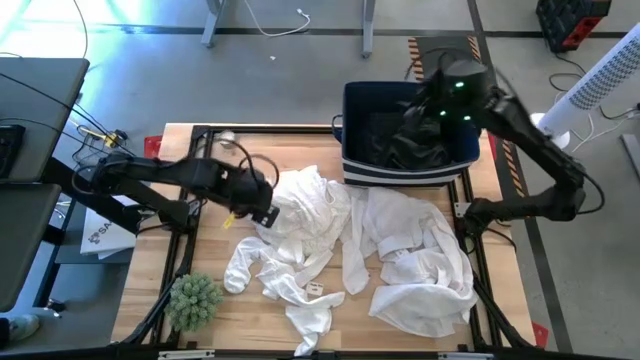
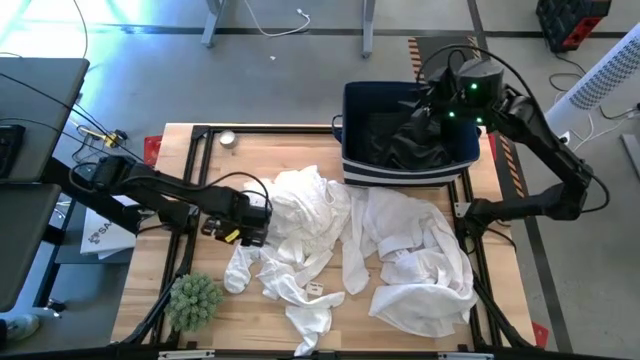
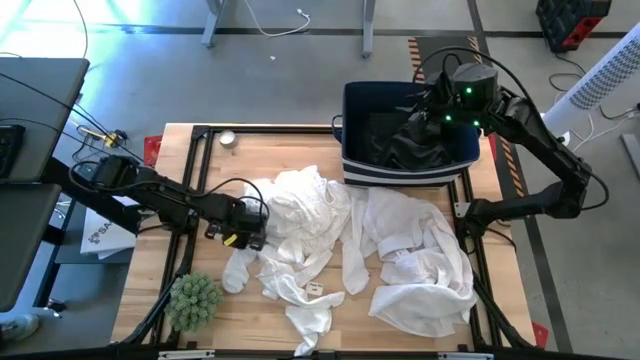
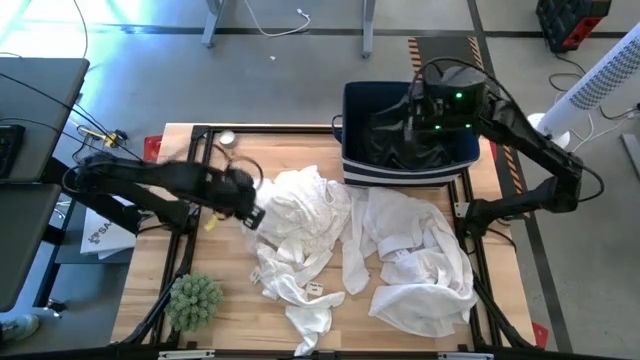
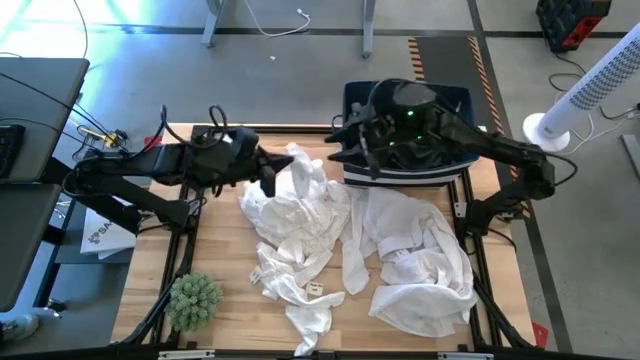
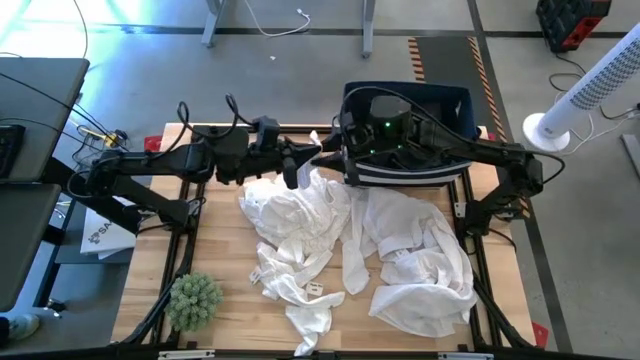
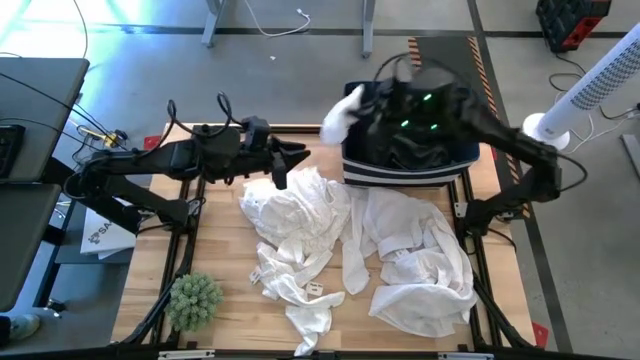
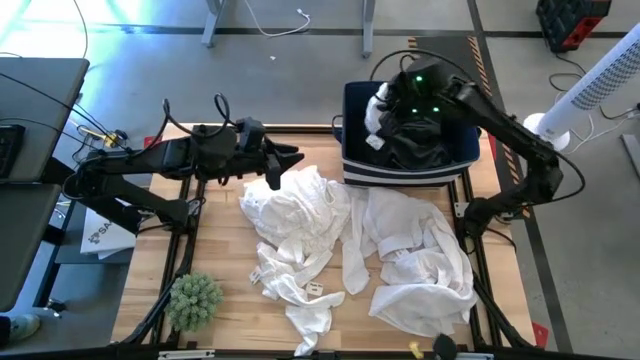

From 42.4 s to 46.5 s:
Task: Sort clothes
Put the white sock into the blue laundry organizer

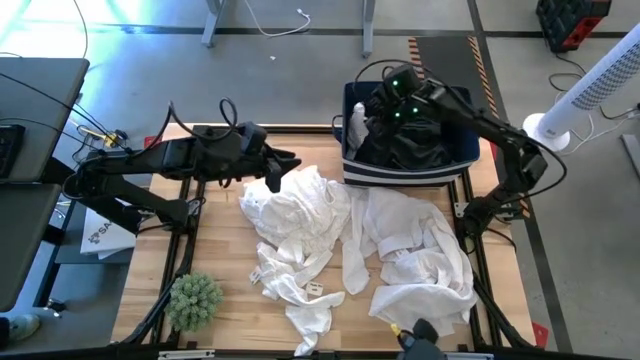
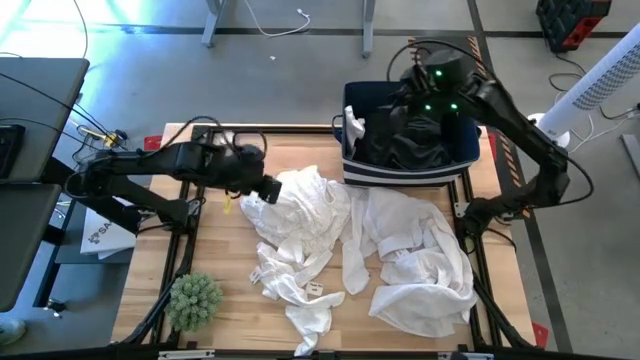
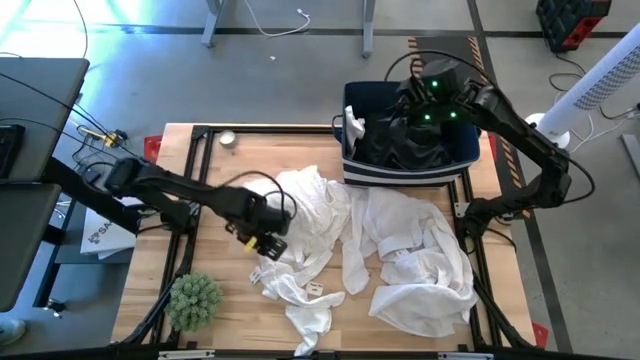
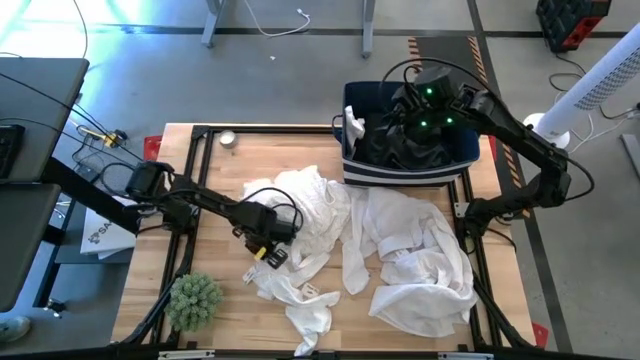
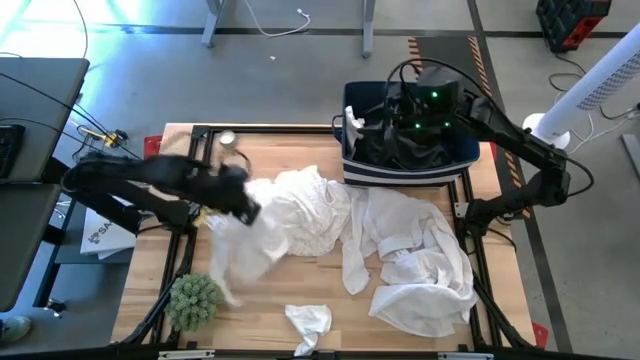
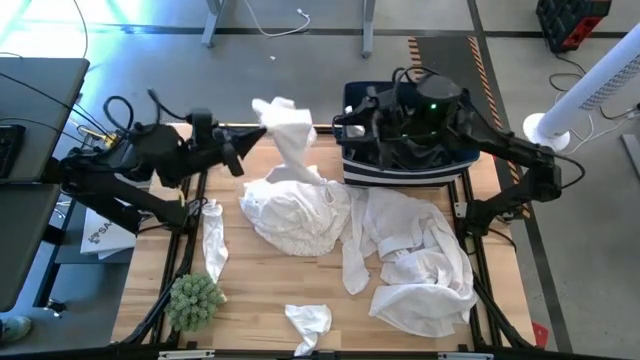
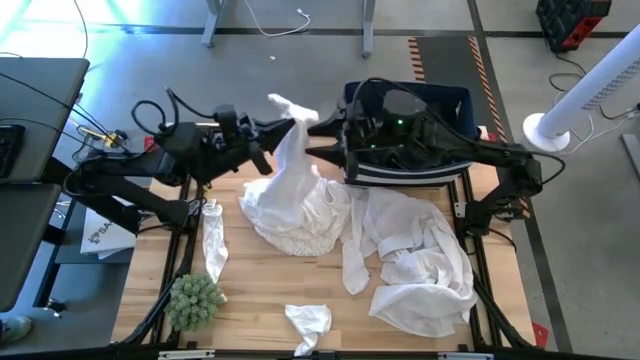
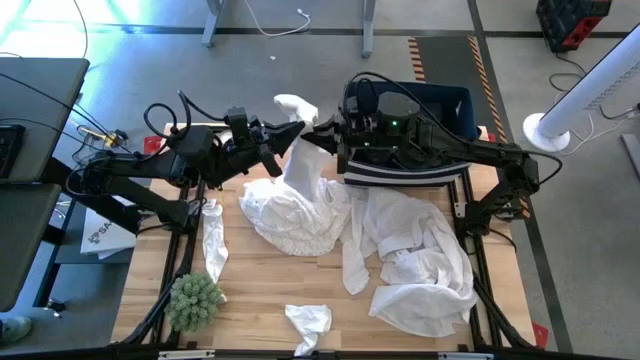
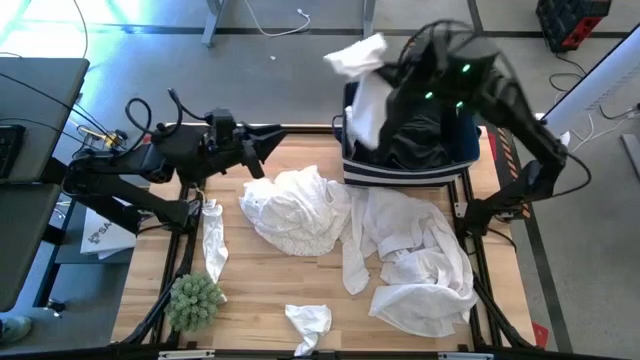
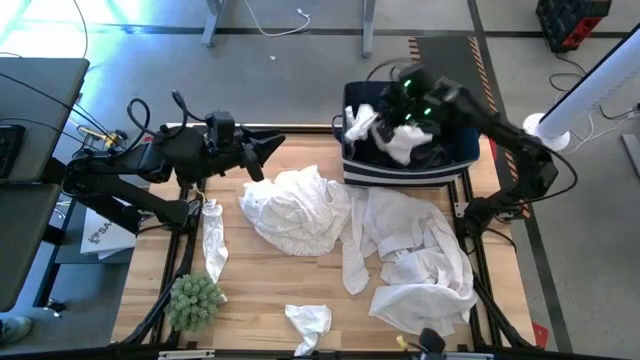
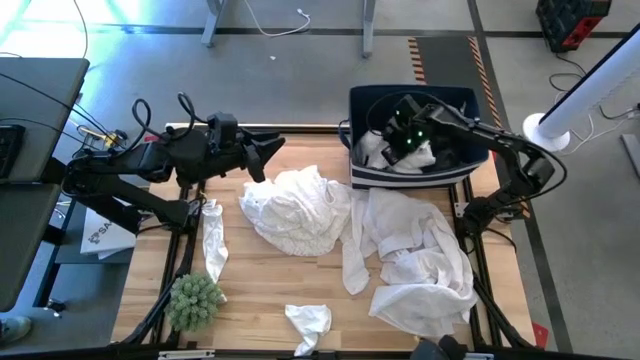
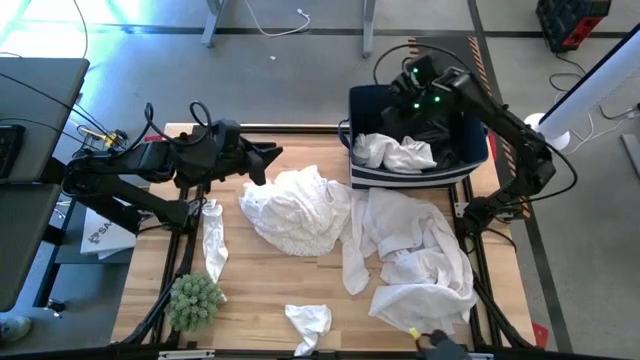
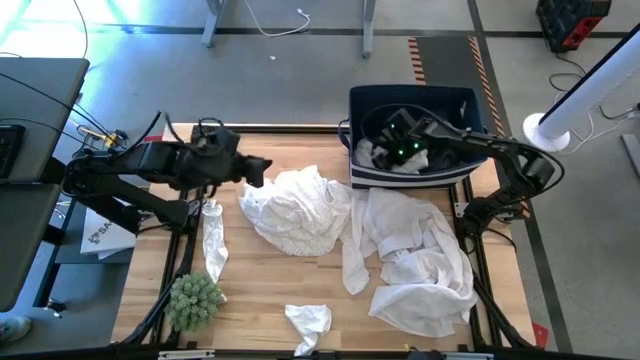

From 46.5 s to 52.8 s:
Put the white short into the blue laundry organizer

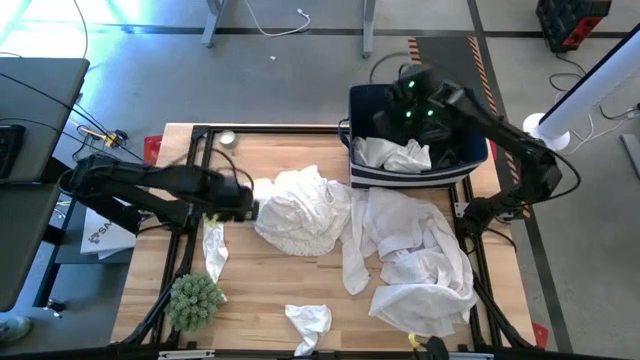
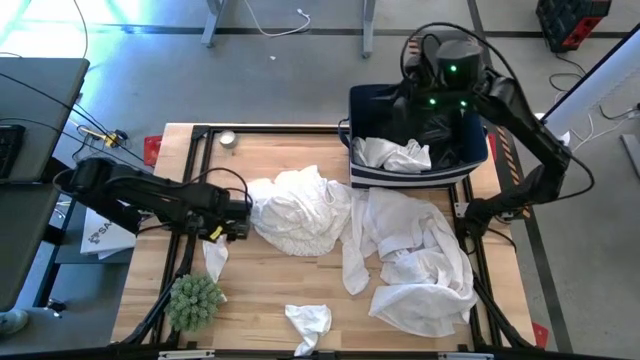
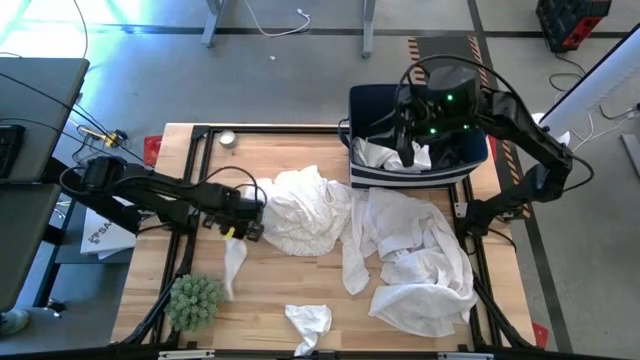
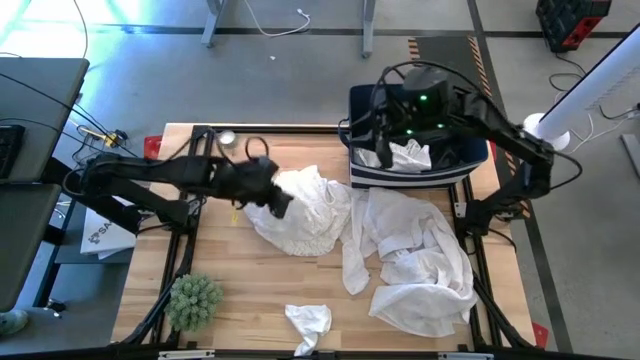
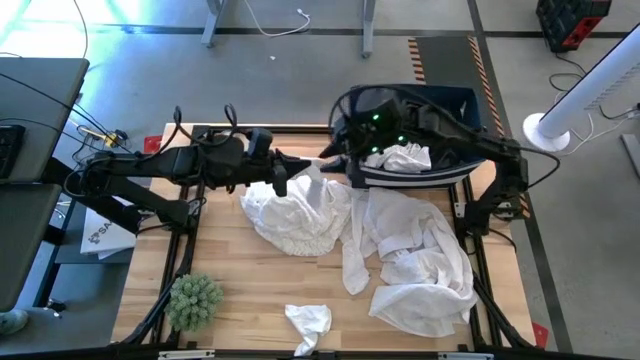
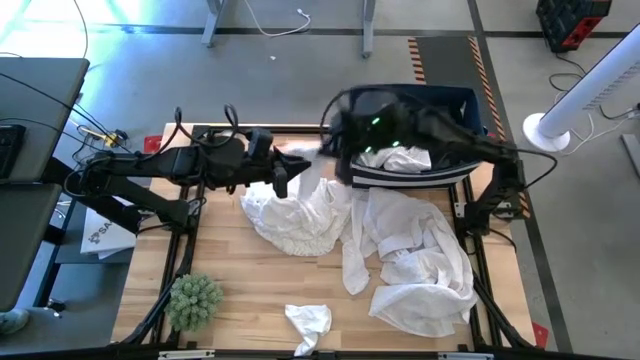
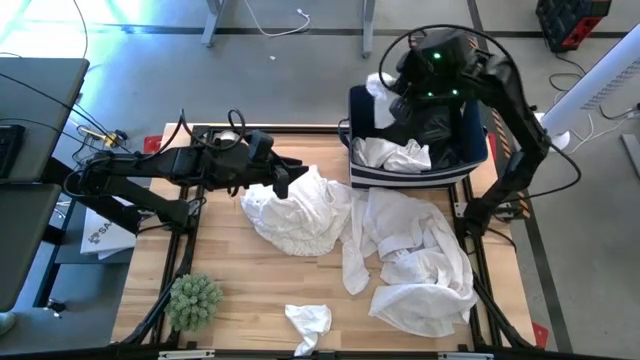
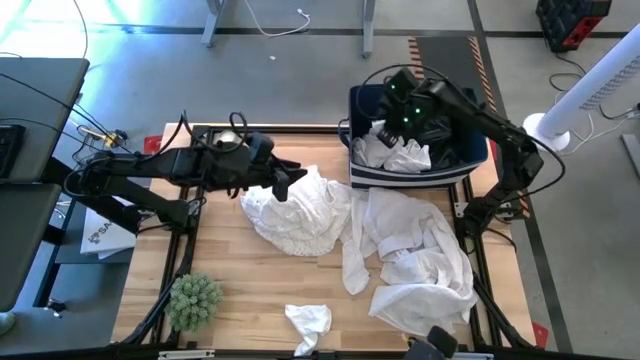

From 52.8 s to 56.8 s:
Put the white sock into the blue laundry organizer

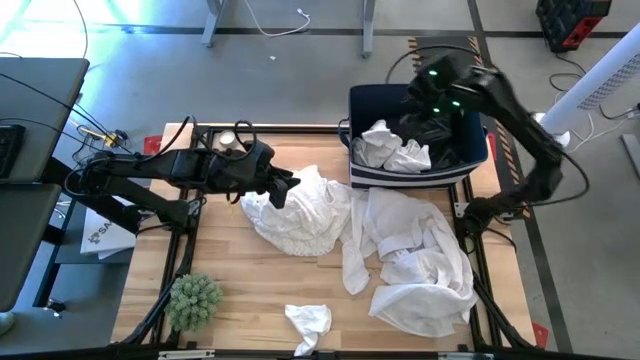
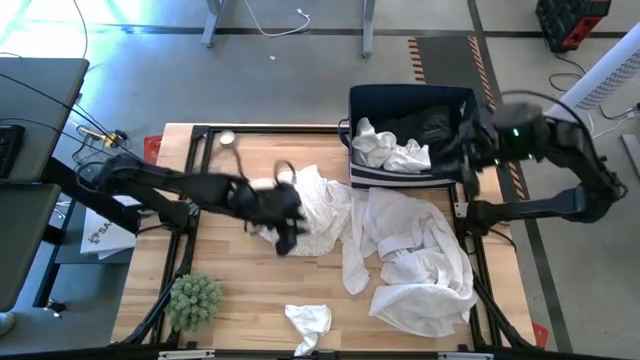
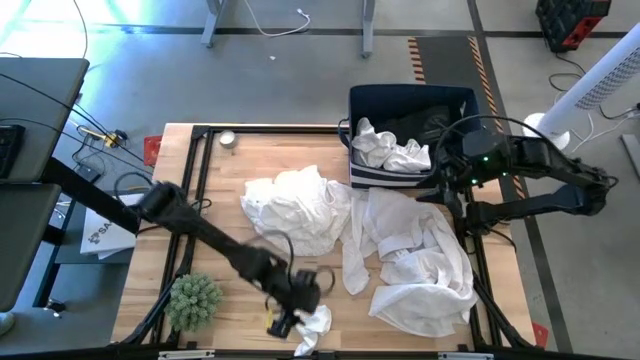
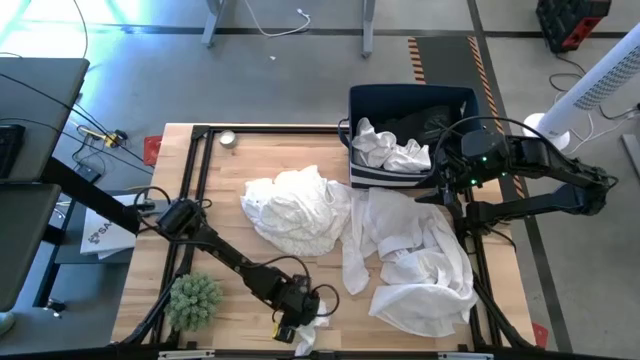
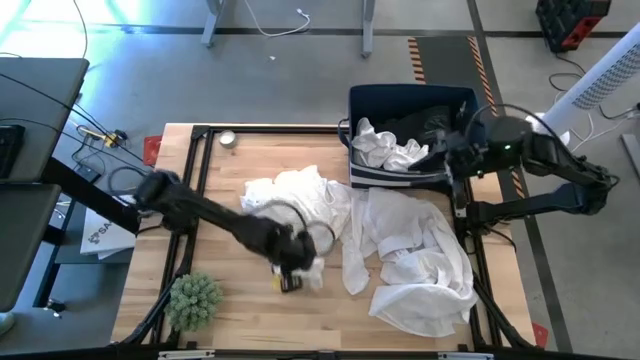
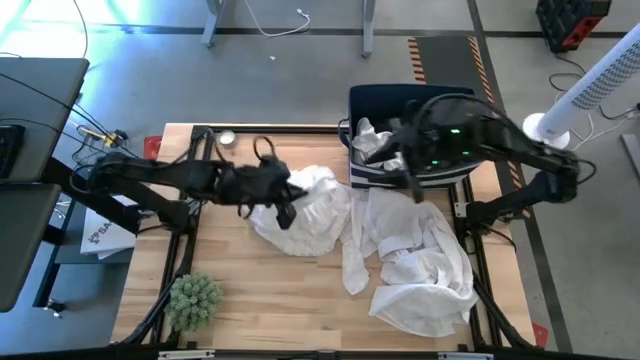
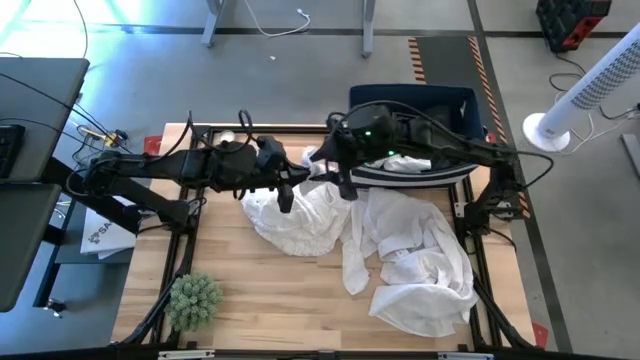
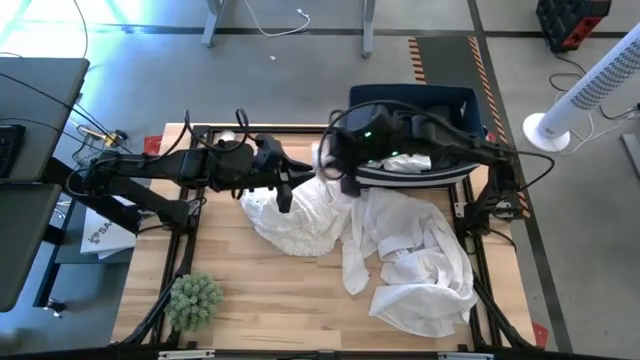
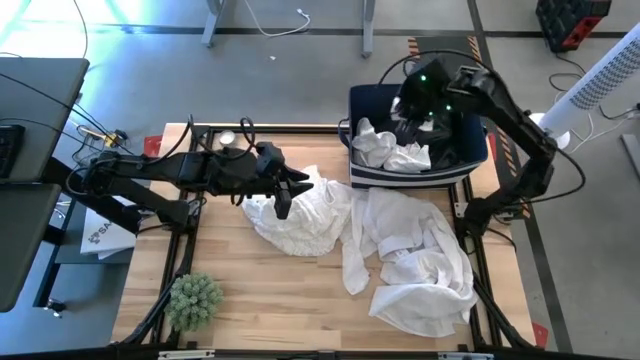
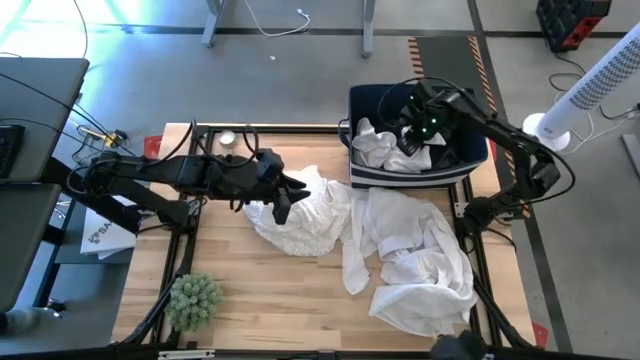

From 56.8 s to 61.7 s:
Put the white sock into the blue laundry organizer

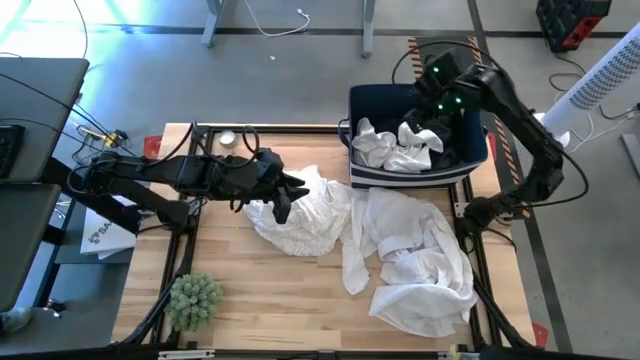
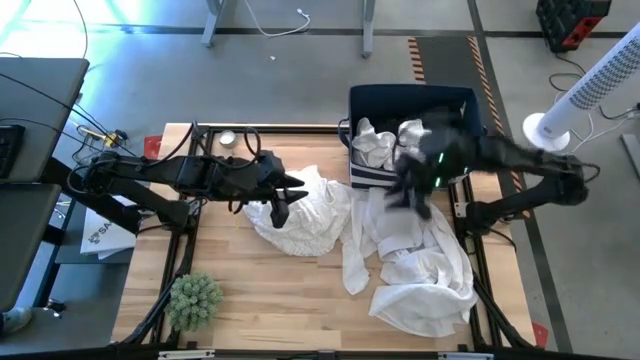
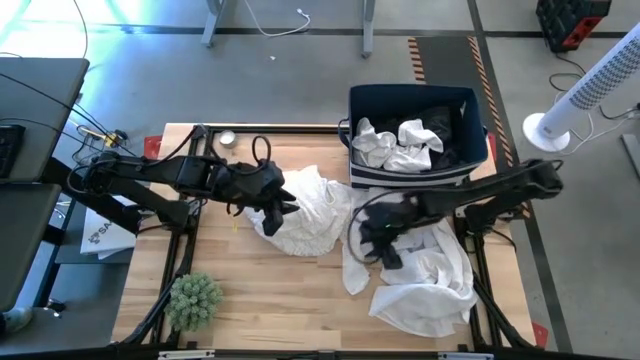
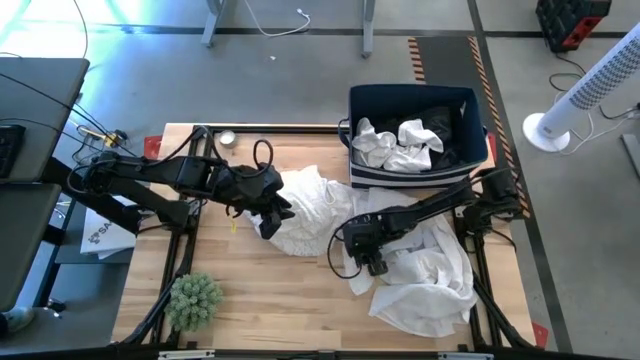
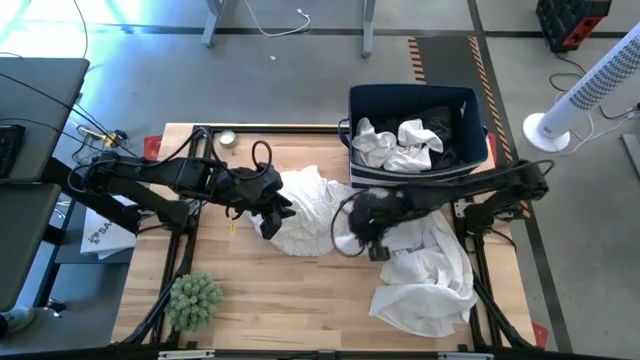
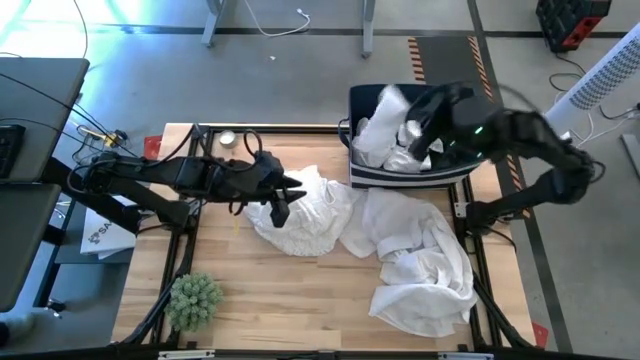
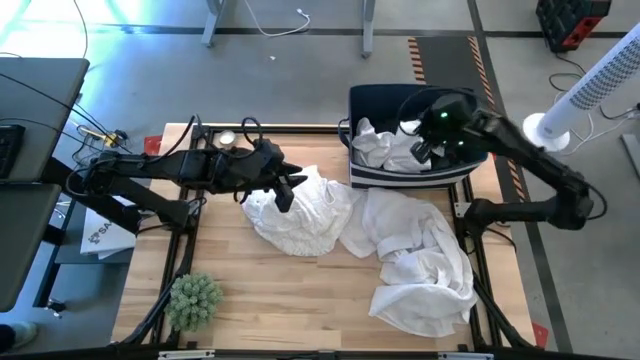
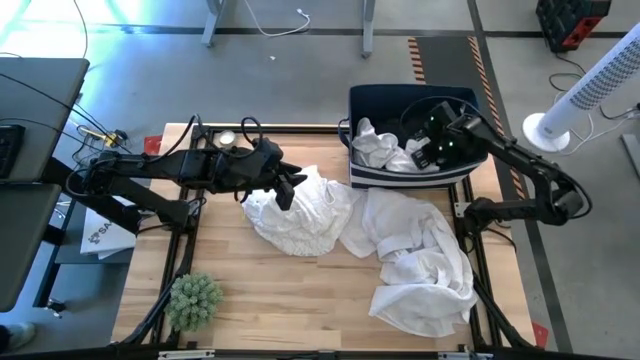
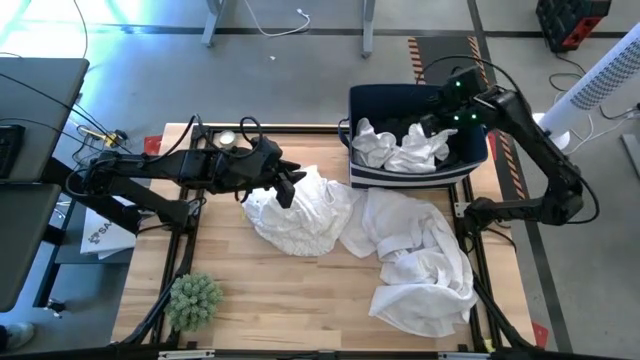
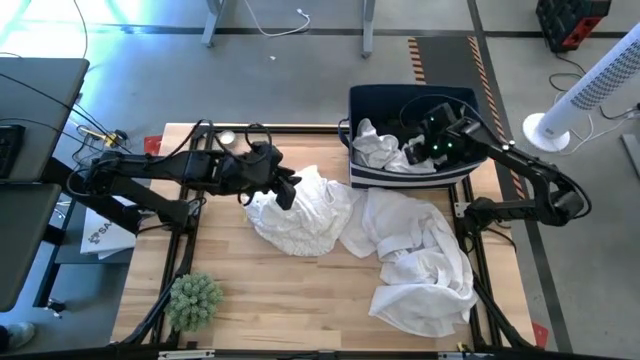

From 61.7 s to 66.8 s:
Put the white sock into the blue laundry organizer
